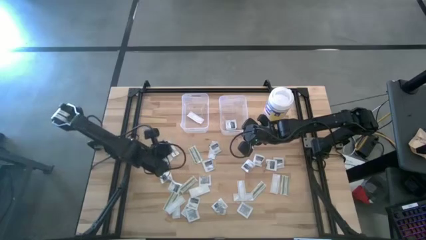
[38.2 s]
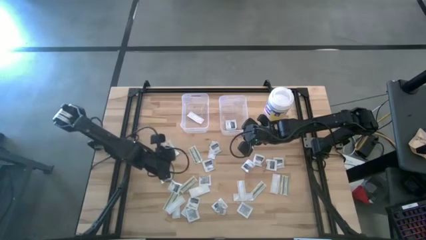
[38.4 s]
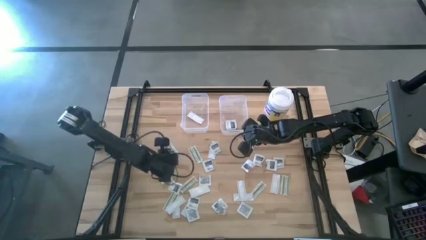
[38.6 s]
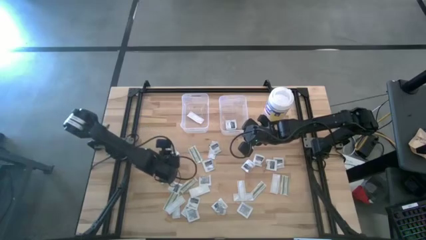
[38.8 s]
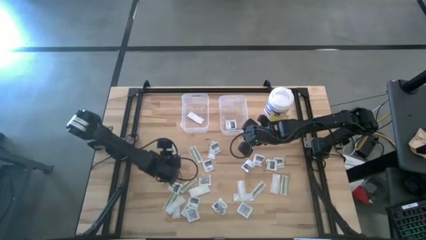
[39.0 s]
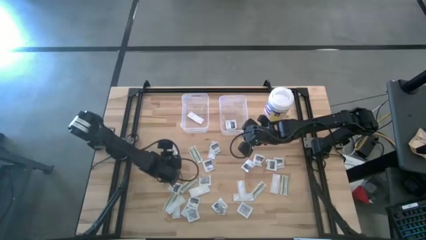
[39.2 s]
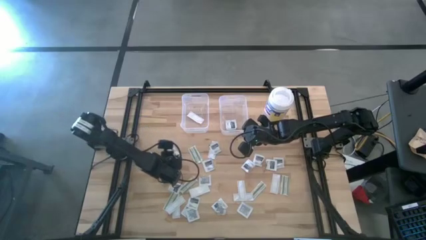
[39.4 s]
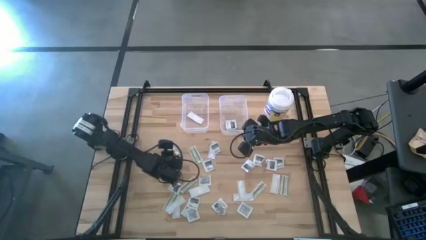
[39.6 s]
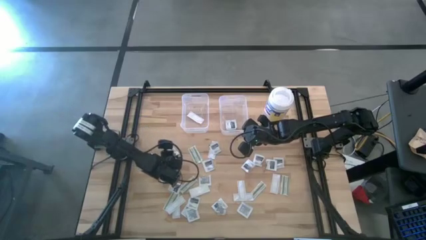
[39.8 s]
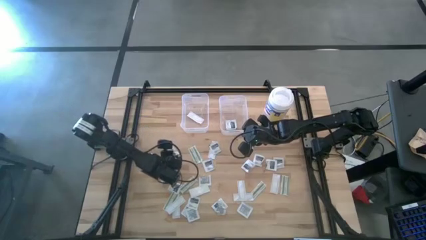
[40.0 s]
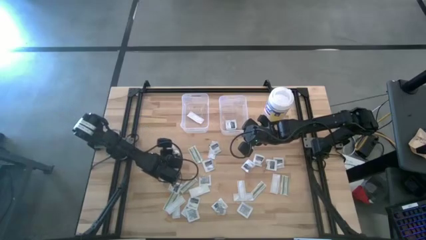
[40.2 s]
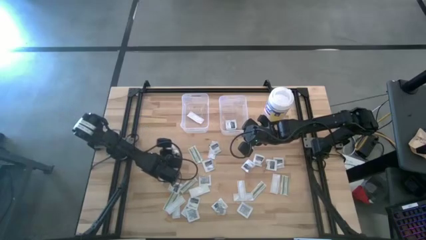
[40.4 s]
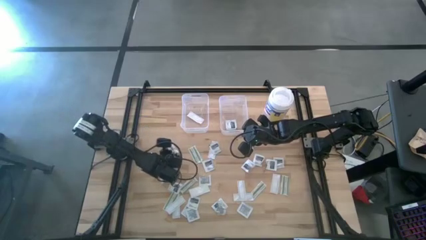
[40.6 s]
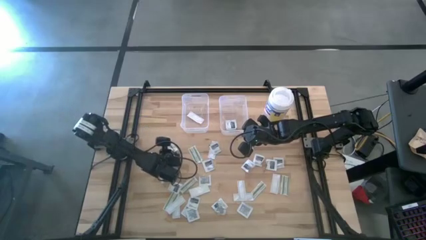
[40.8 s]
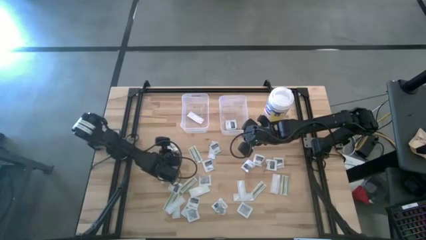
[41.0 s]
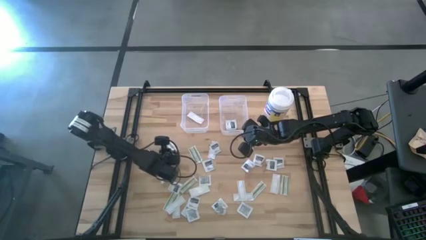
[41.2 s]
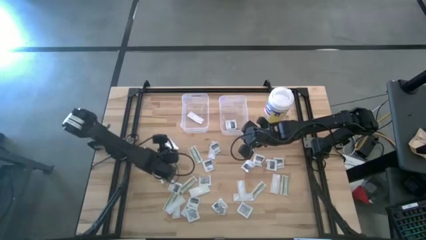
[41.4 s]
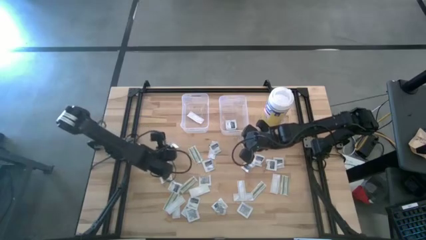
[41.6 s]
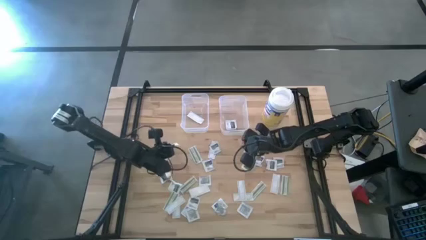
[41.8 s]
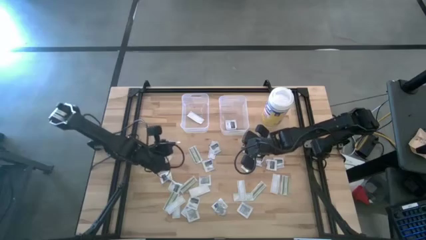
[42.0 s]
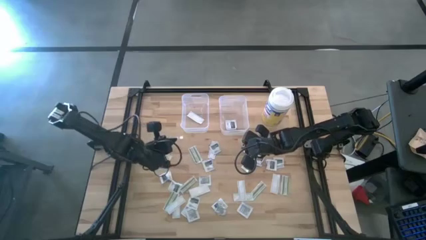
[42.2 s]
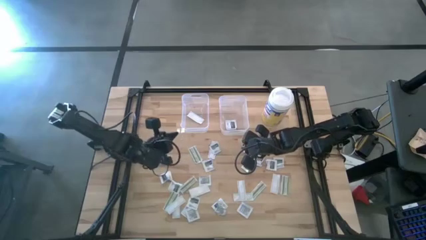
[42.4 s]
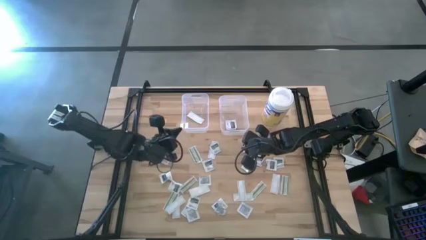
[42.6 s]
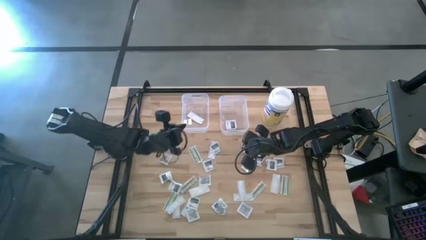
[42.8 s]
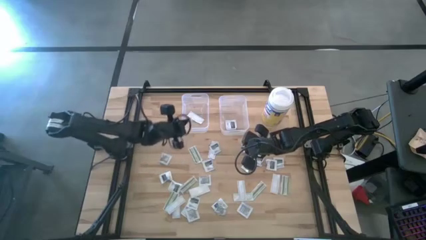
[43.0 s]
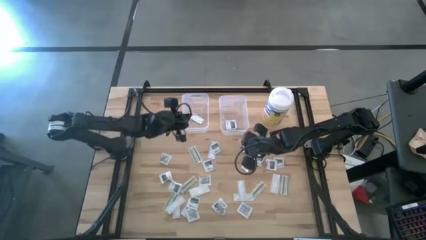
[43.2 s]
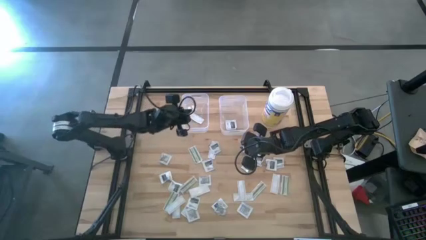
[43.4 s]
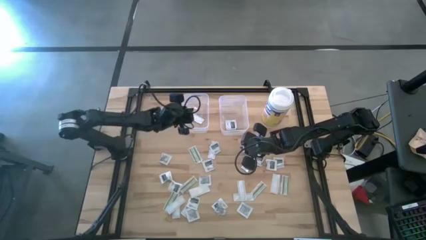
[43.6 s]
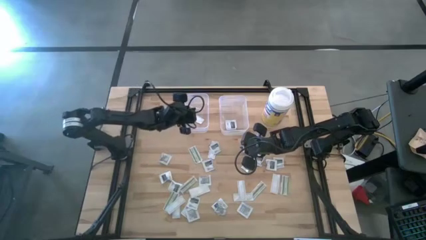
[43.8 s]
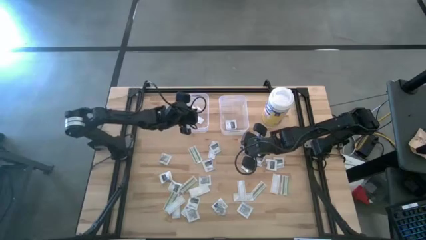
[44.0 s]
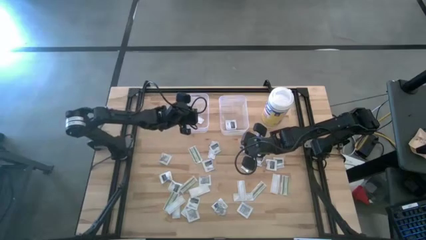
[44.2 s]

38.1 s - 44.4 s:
Task: Pick & Place First Aid Supplies
Put the green bandage pack into the left transparent bin

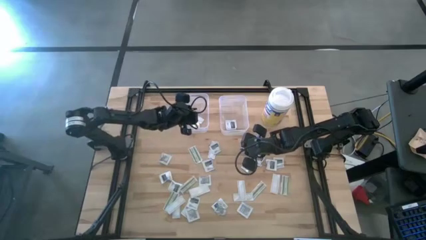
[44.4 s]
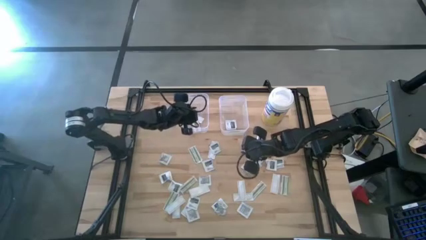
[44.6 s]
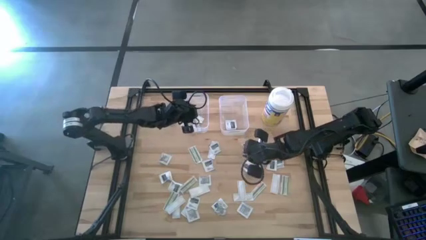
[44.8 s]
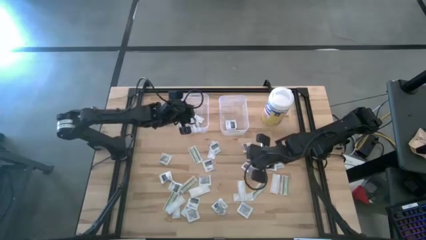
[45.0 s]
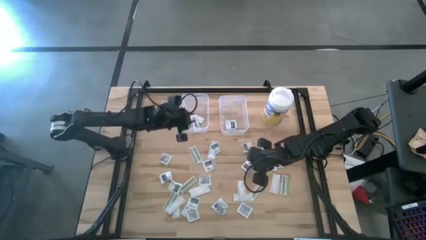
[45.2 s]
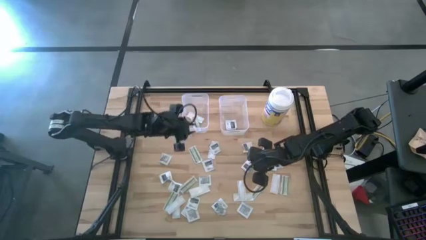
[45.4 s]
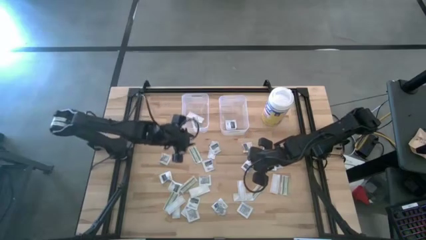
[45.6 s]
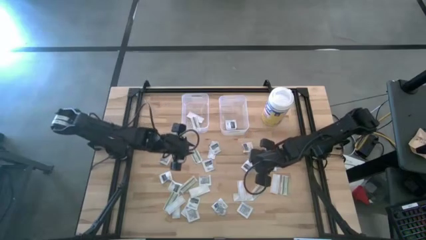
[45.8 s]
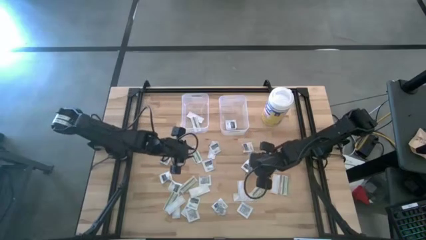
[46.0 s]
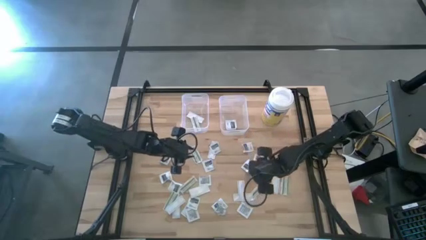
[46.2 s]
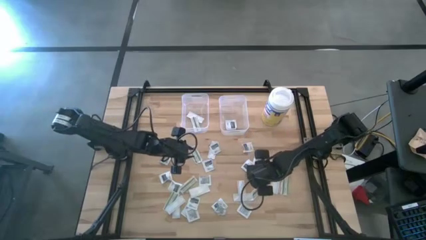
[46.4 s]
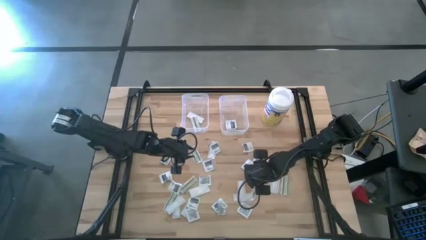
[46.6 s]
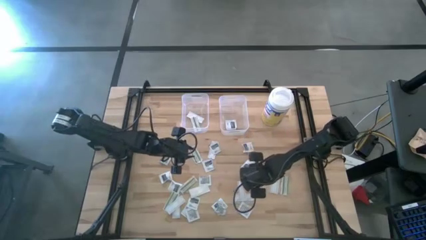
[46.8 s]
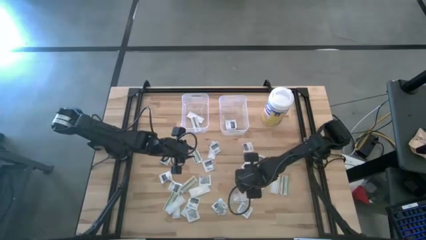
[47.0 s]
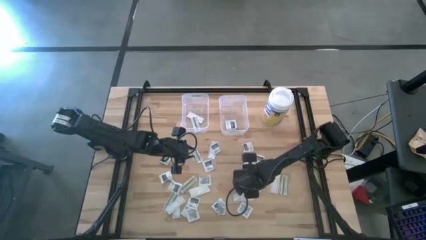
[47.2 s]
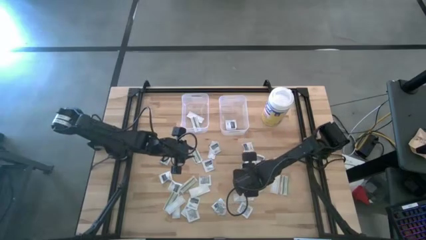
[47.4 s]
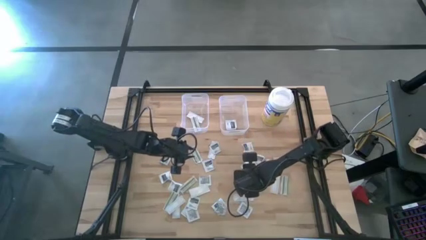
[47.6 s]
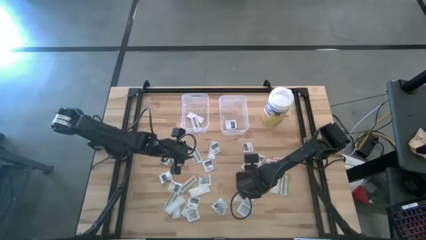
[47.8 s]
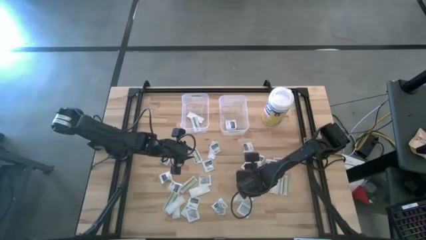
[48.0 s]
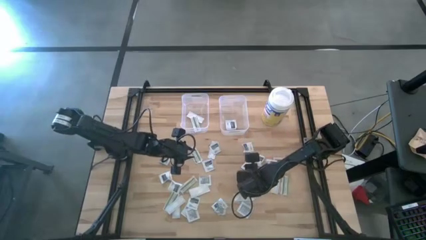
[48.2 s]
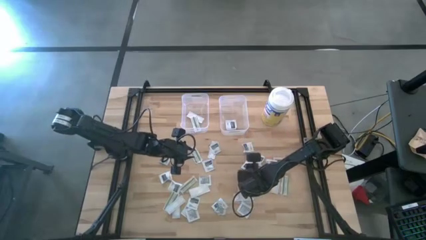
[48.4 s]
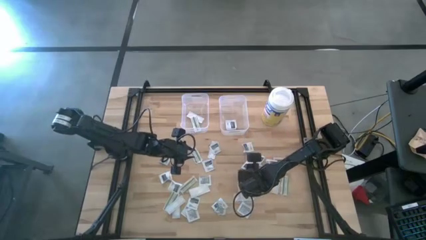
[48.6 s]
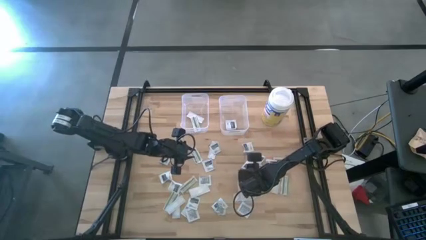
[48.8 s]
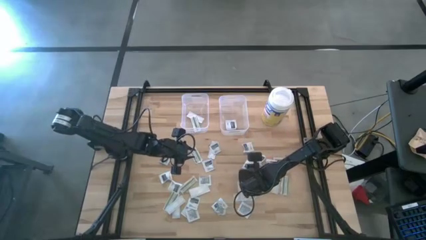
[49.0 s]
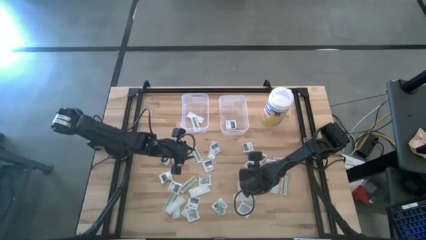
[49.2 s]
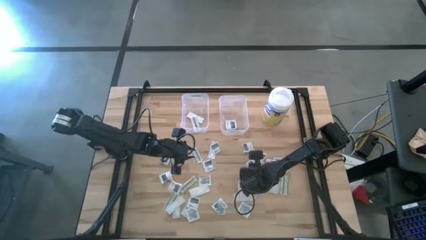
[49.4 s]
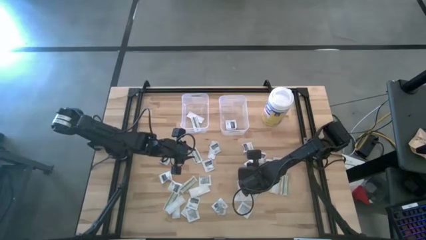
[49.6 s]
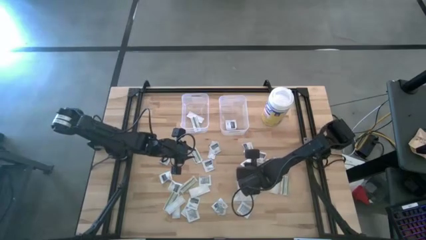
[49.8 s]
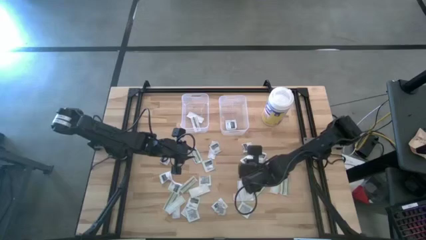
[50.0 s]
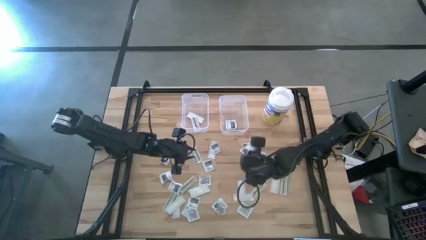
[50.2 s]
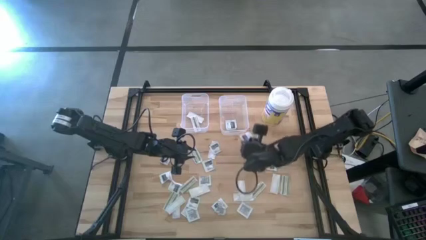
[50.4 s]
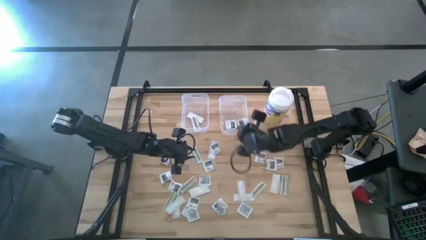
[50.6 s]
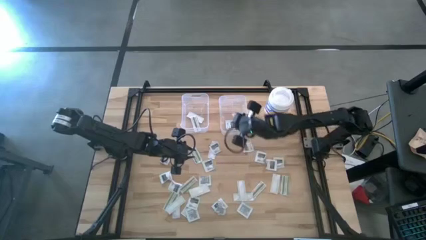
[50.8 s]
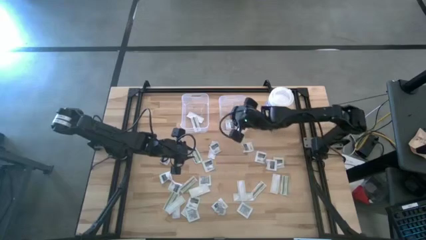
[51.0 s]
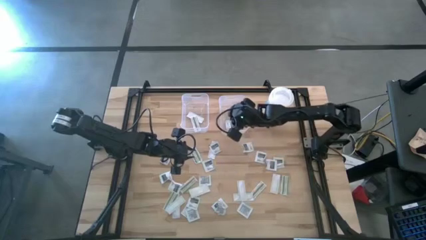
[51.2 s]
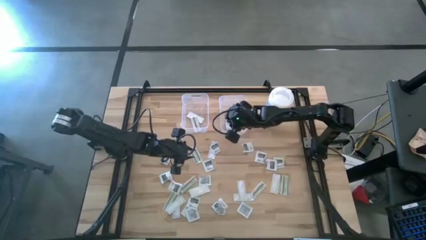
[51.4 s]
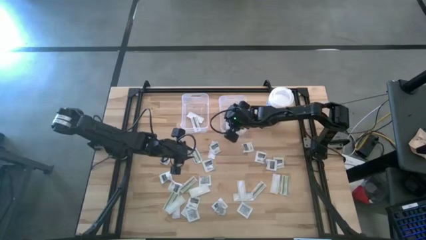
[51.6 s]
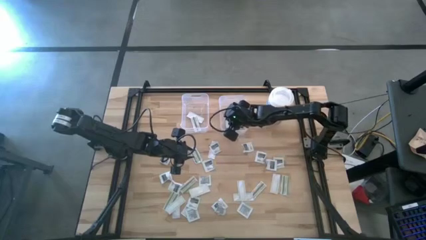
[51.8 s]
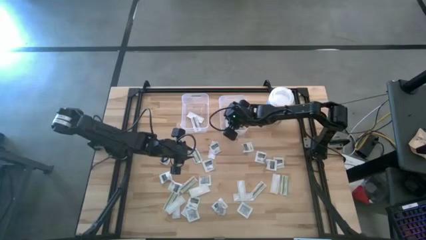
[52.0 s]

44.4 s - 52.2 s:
Put the gray towelette pack into the right transparent bin
